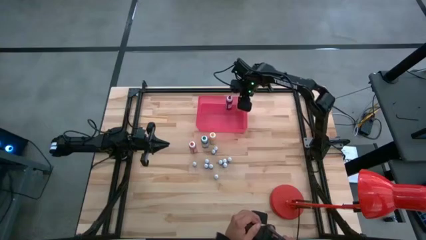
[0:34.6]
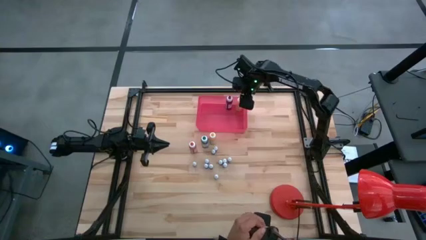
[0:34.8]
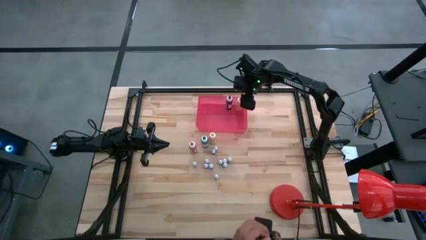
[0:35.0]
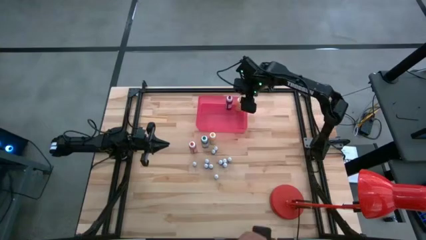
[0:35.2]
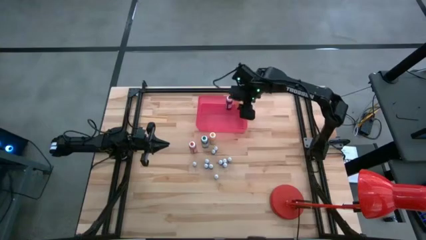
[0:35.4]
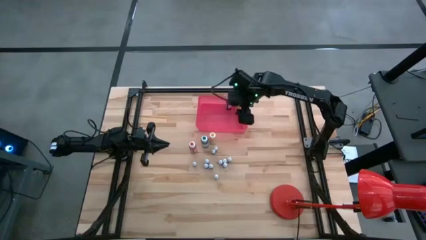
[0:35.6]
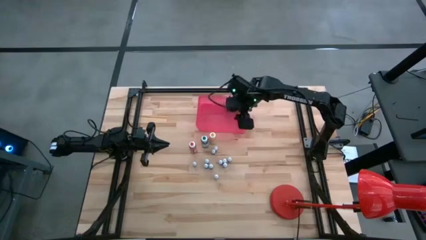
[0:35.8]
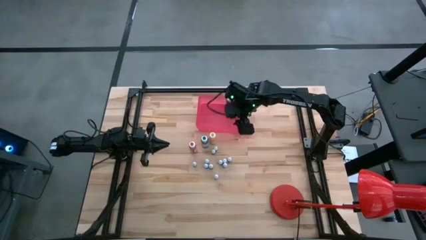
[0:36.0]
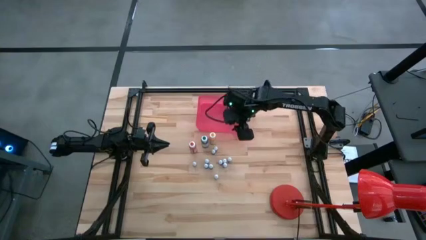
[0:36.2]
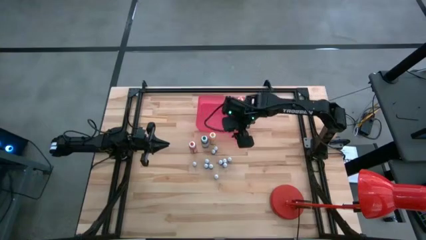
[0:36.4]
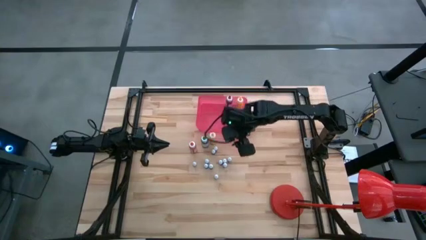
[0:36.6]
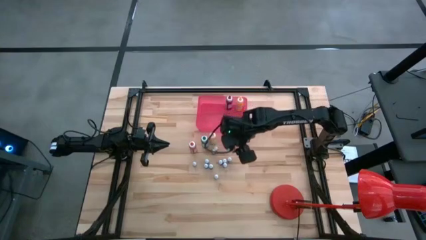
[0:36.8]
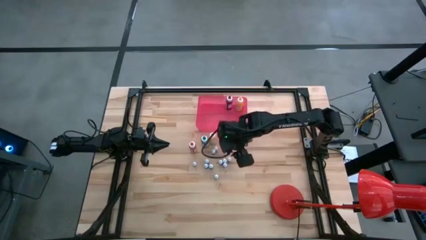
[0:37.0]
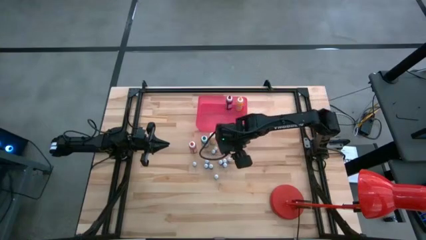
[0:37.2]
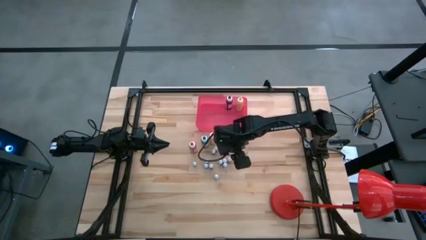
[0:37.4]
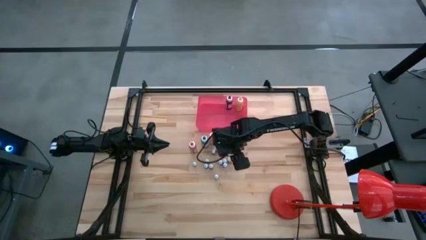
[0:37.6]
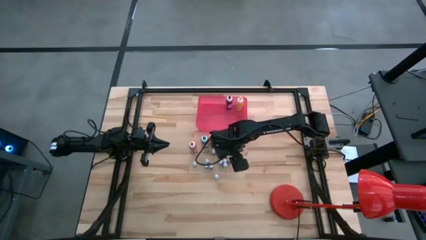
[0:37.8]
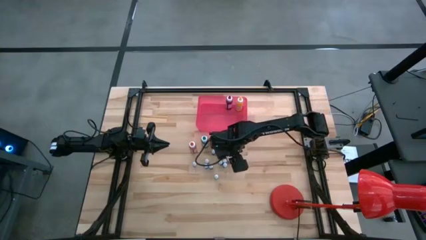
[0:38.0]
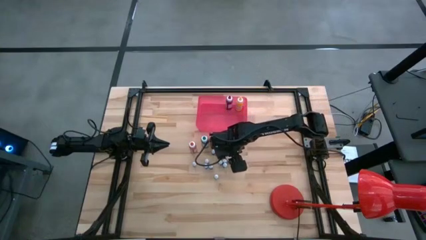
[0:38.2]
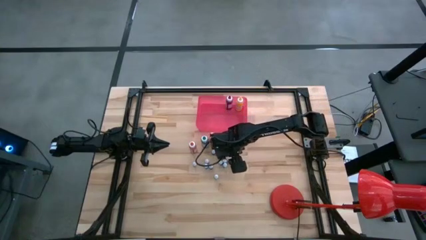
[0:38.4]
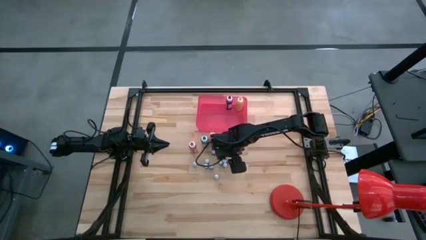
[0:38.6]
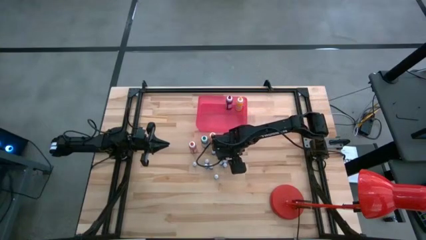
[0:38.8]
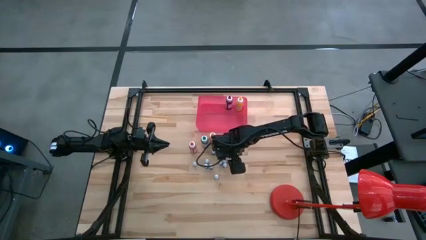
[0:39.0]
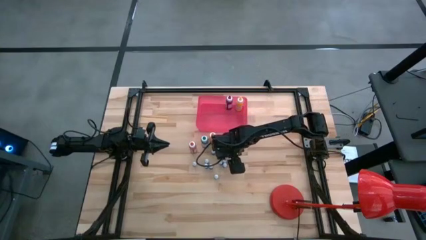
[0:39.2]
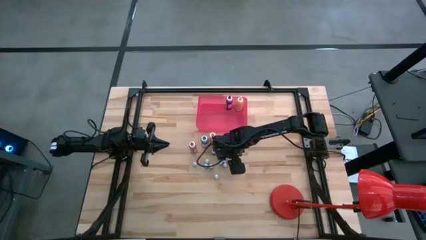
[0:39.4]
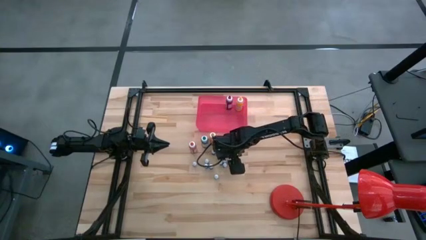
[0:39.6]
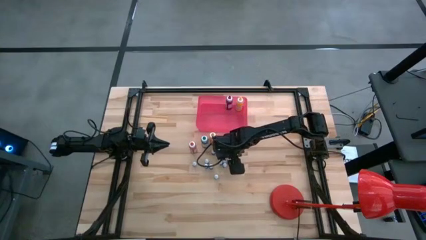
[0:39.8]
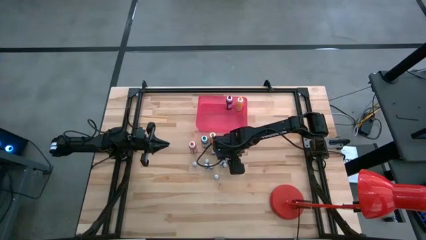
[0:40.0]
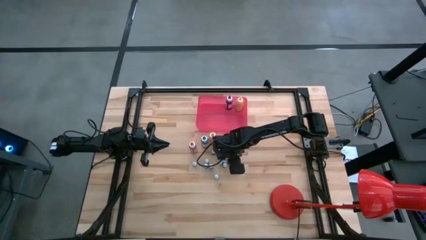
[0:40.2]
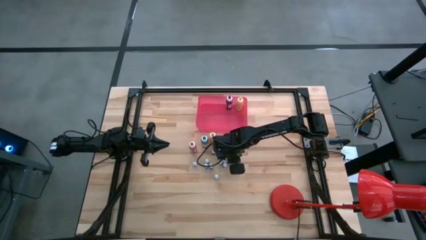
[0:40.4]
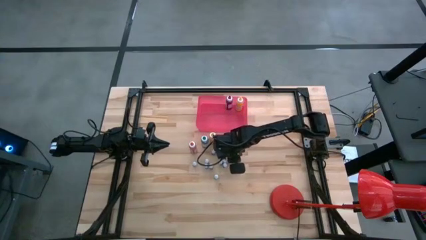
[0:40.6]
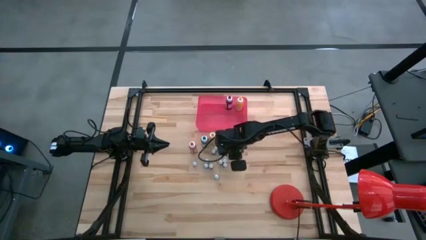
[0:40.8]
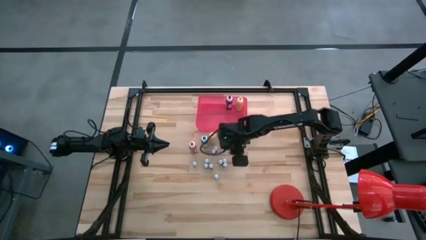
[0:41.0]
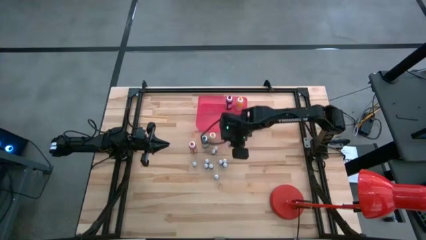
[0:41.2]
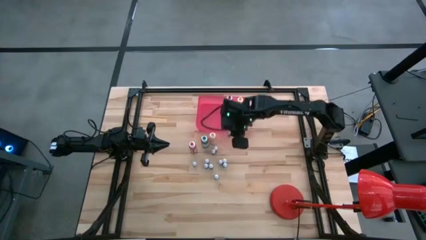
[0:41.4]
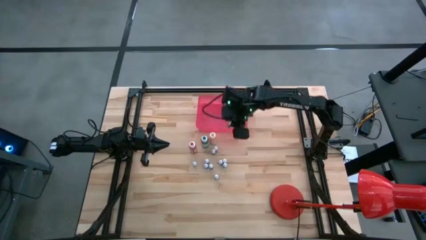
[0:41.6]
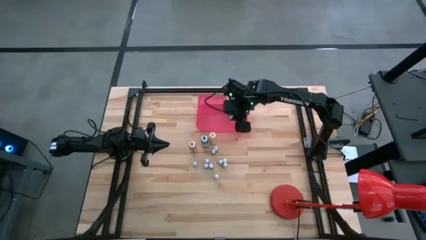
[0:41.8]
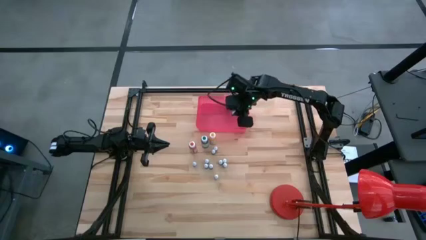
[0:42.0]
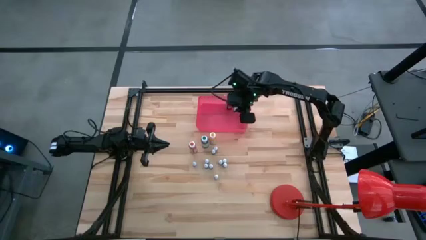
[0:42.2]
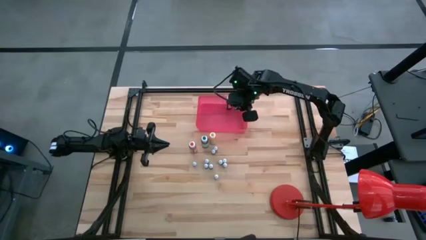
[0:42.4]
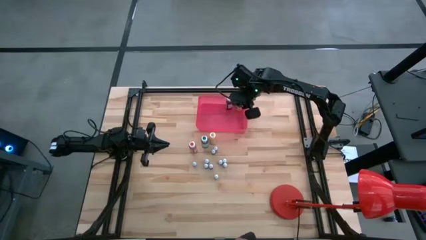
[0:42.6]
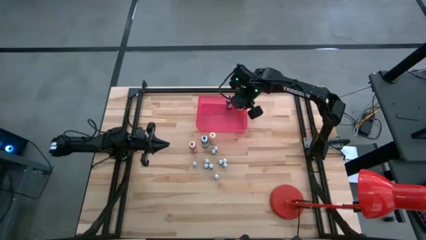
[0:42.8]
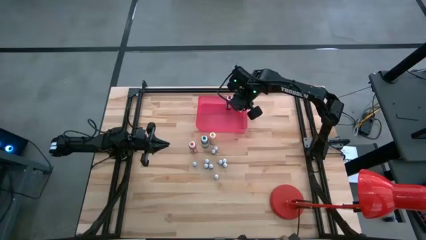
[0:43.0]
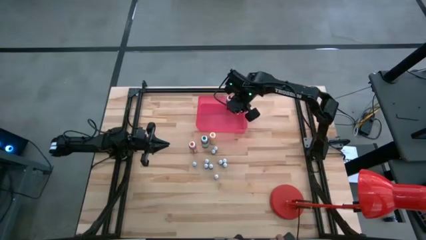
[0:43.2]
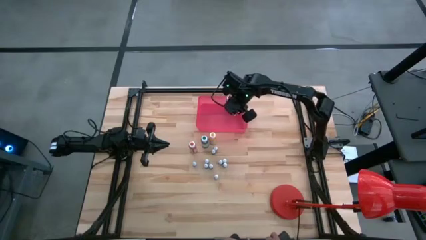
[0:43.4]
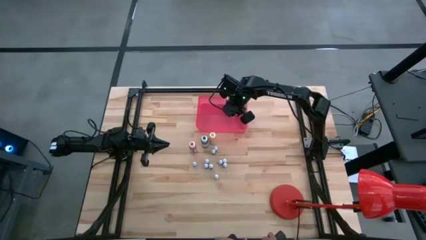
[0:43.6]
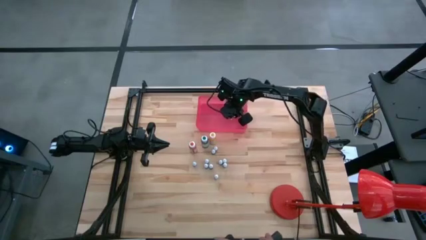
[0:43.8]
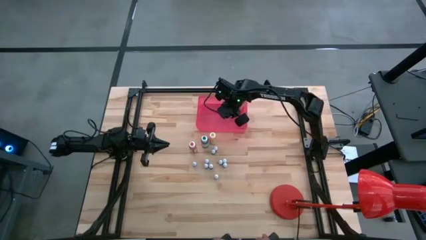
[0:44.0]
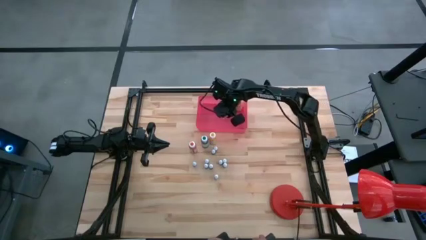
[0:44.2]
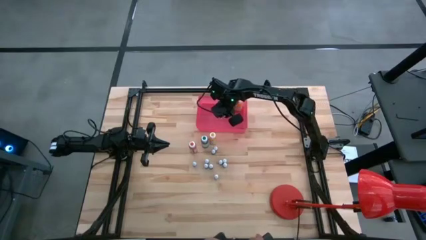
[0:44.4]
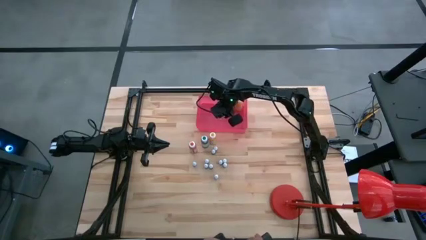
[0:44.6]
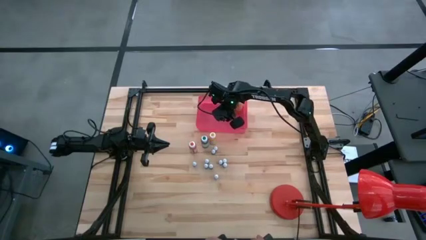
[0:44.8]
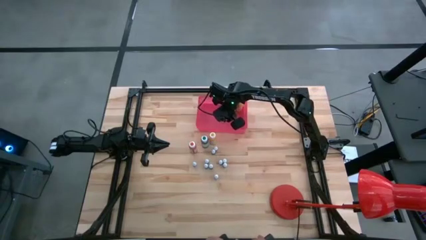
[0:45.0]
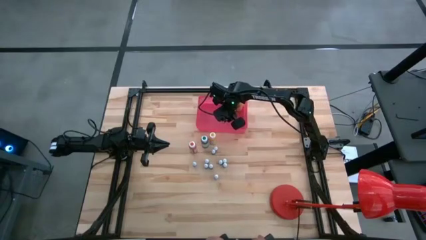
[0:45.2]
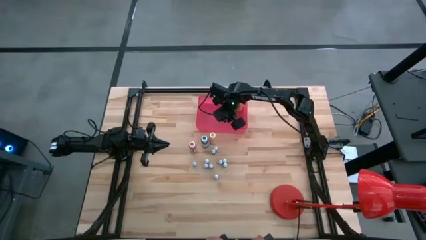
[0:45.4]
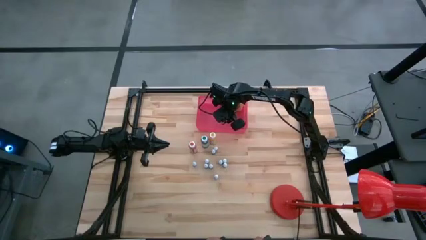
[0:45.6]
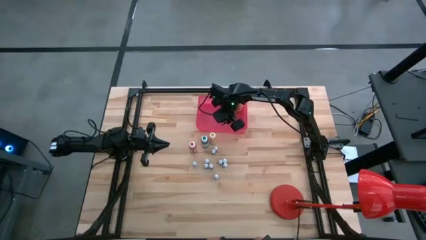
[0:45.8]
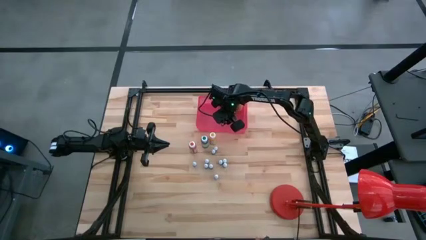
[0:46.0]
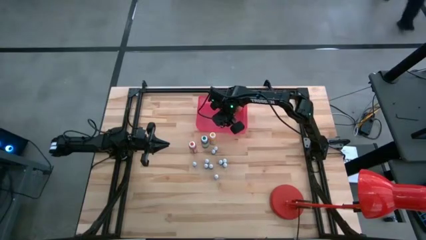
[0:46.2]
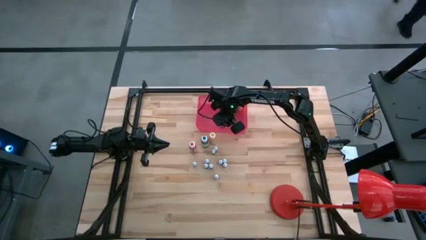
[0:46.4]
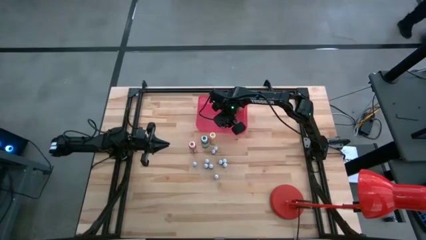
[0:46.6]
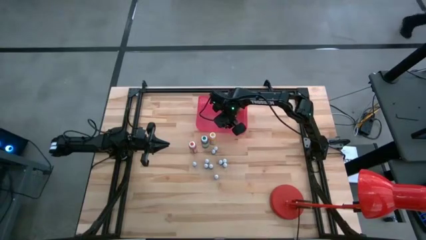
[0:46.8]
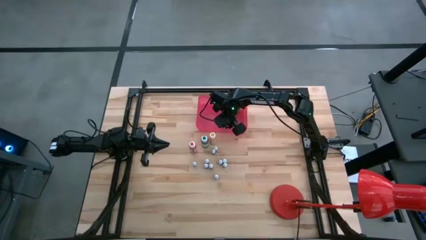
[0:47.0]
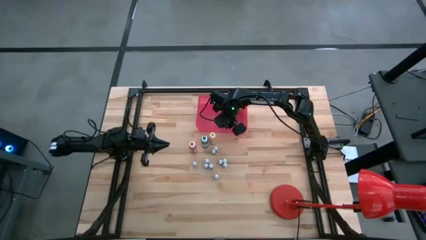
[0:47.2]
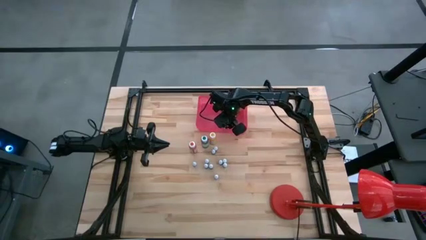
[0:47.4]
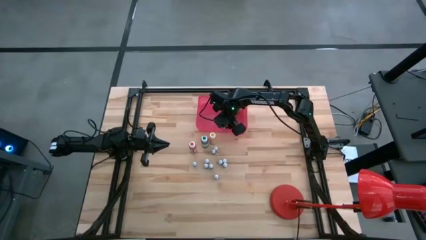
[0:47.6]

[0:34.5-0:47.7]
Task: Pick & Place food coloring
Put the small green food coloring bottle into the pink bin

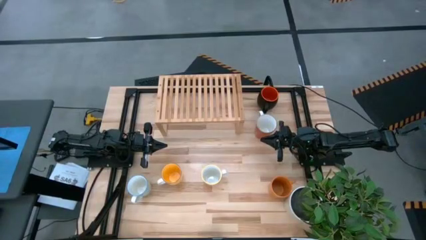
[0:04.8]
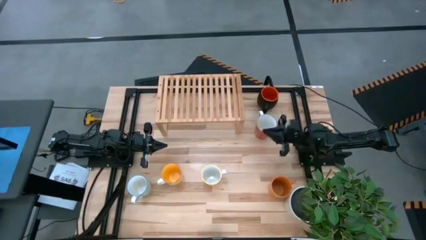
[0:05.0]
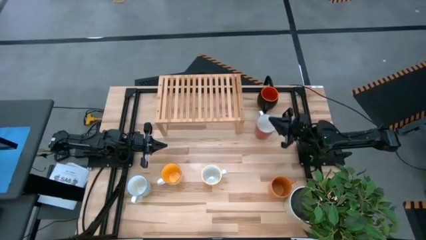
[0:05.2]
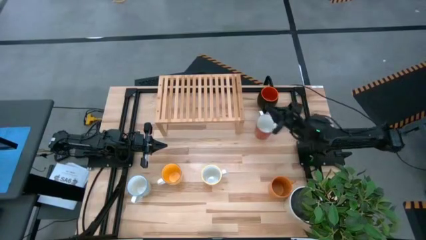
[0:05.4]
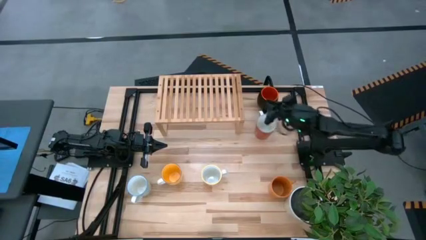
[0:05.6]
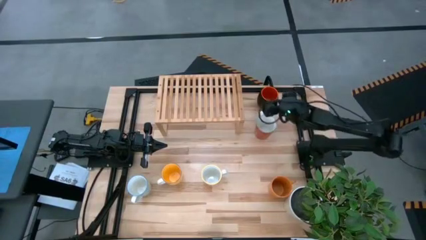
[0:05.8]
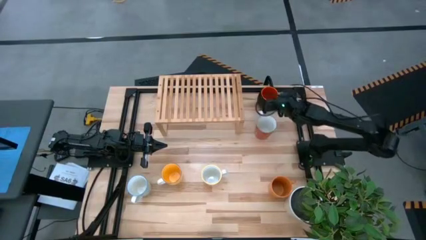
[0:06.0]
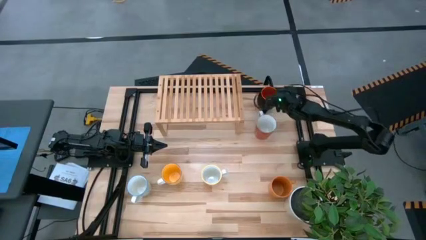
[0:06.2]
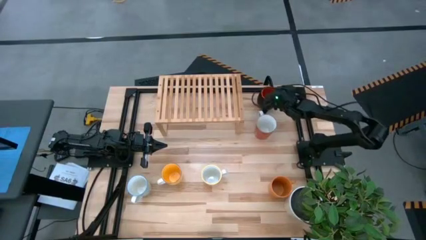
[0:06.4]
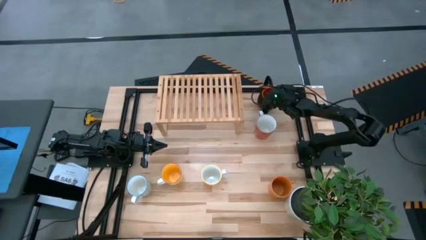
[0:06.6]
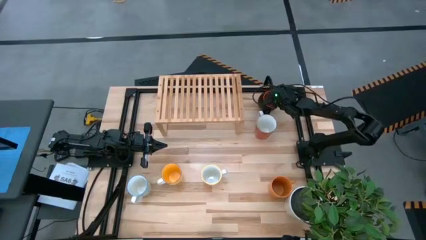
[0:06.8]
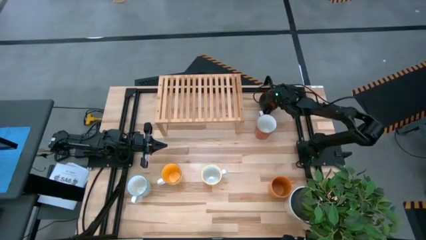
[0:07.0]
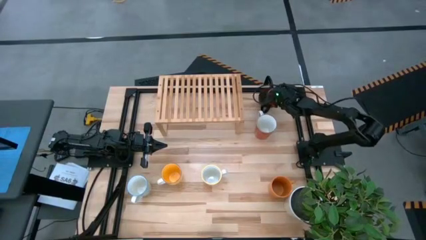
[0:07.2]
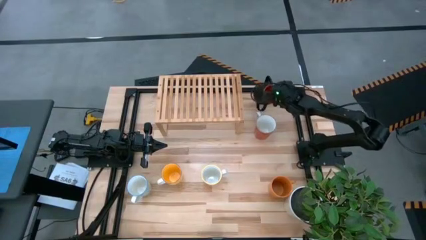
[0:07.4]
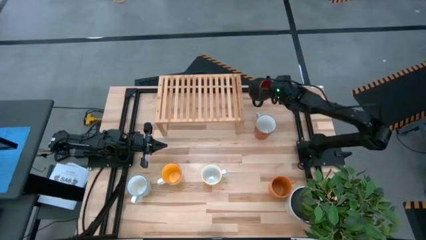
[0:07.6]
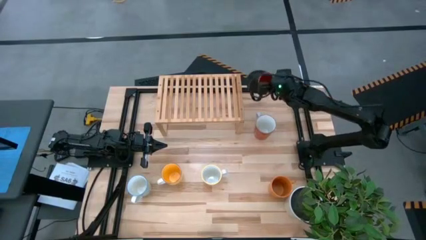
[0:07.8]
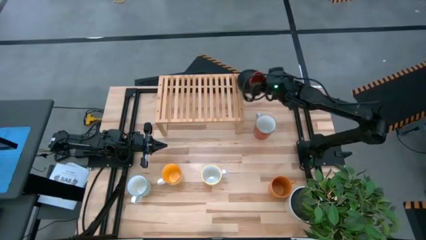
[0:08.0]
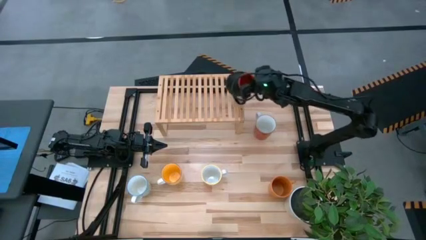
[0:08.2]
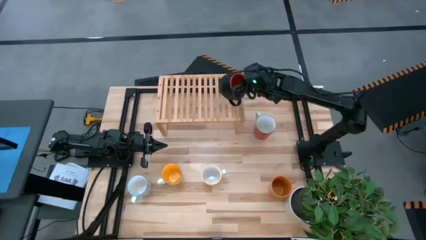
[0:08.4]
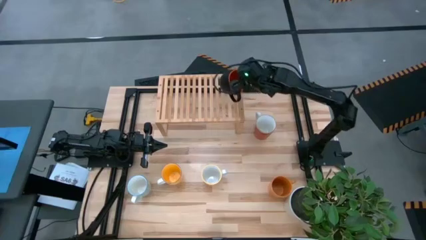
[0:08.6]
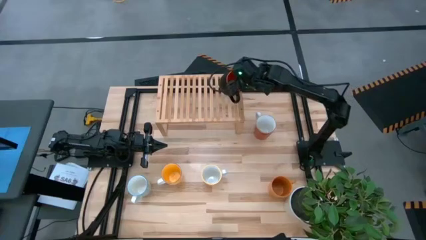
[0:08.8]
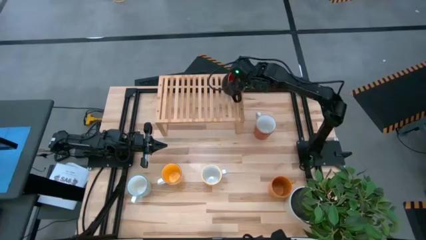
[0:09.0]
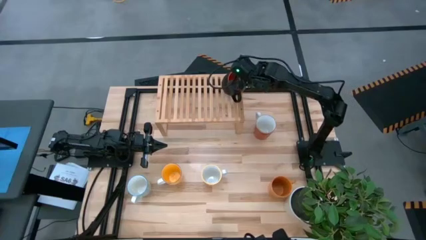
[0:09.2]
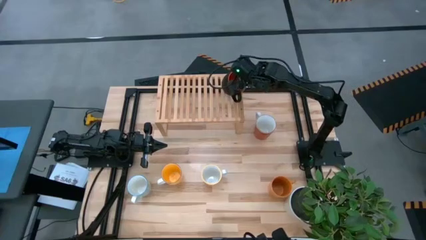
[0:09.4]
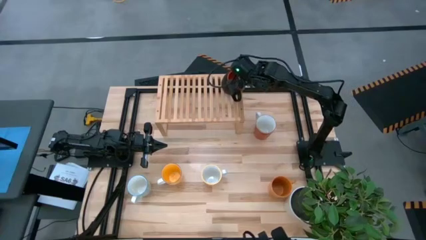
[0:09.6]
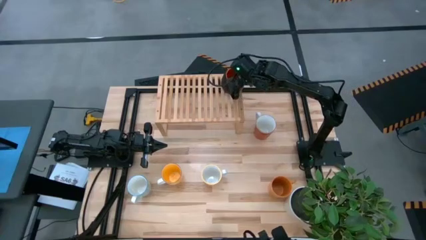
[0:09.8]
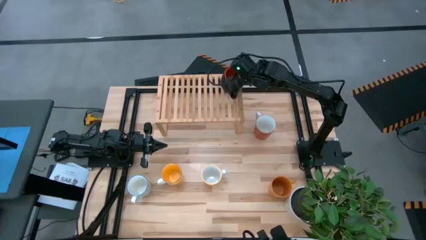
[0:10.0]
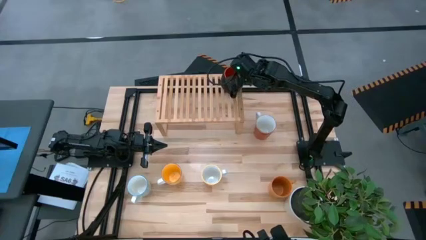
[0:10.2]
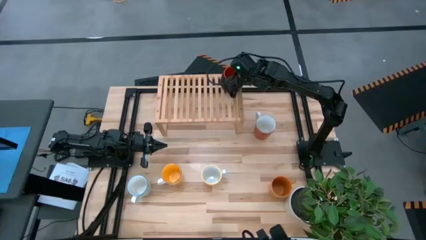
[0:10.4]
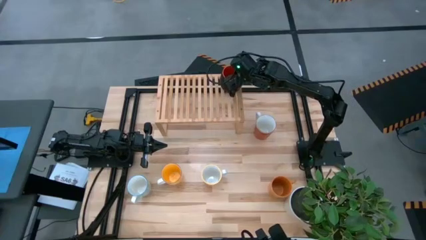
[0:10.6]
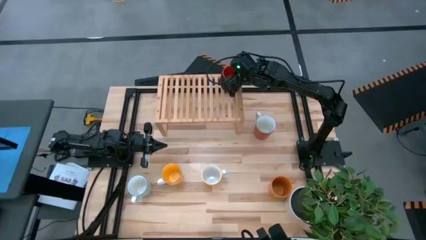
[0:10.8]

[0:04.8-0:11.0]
Task: Place coffee mugs
Put the black mug on the shelf
